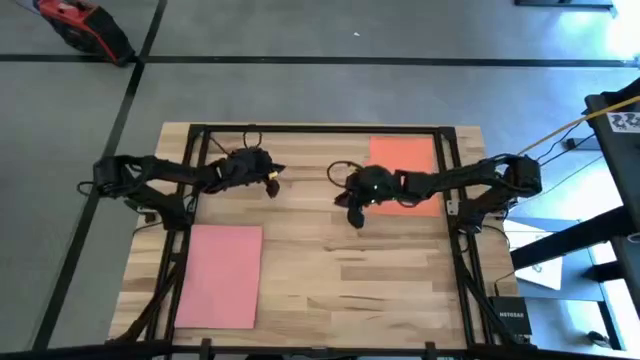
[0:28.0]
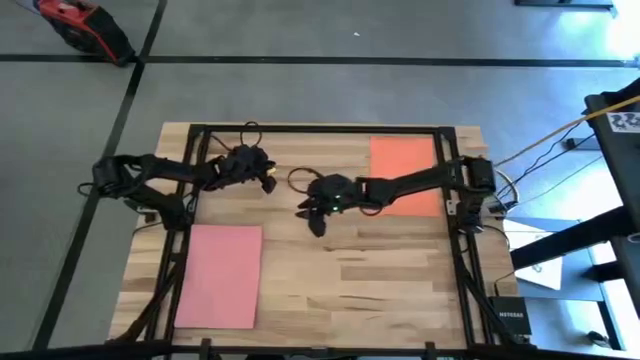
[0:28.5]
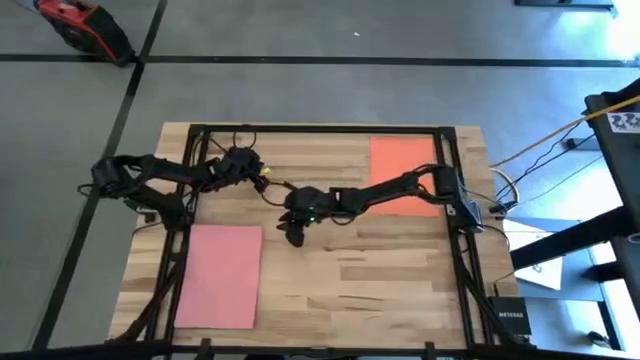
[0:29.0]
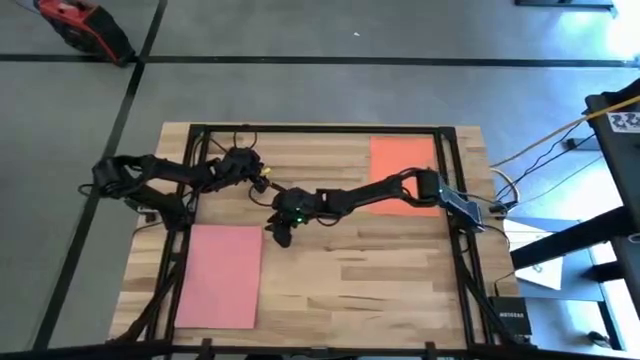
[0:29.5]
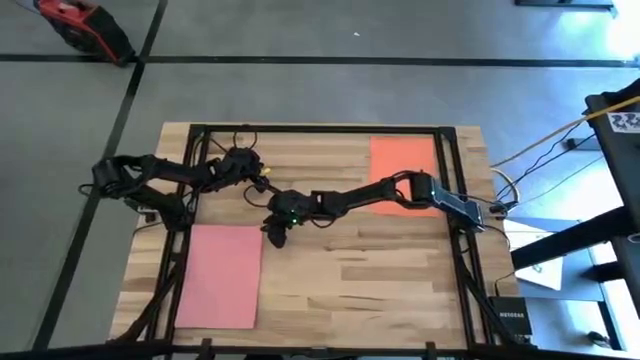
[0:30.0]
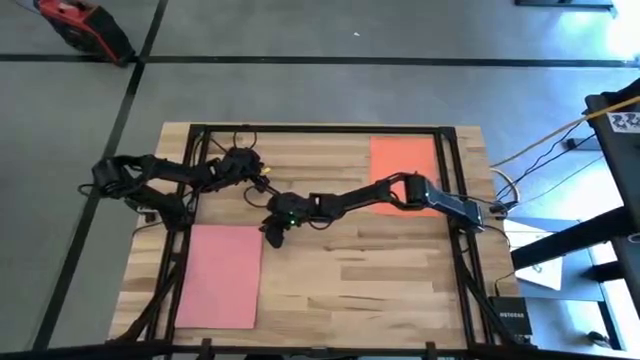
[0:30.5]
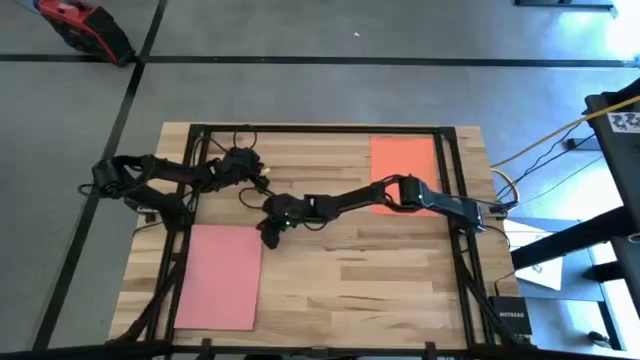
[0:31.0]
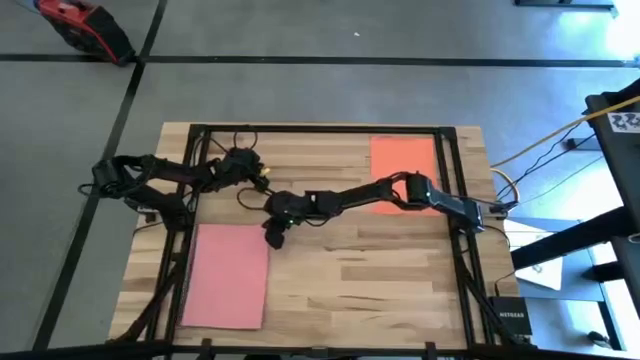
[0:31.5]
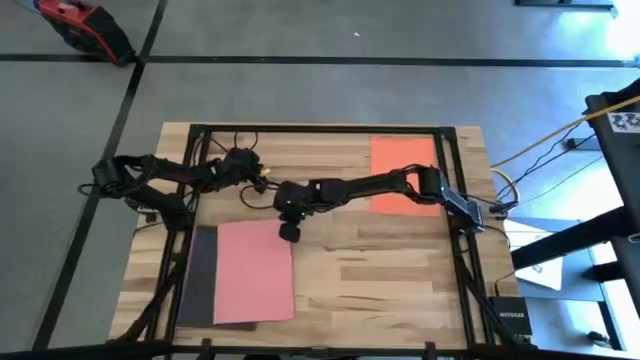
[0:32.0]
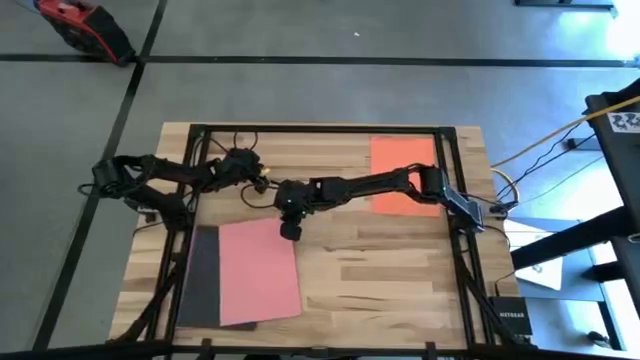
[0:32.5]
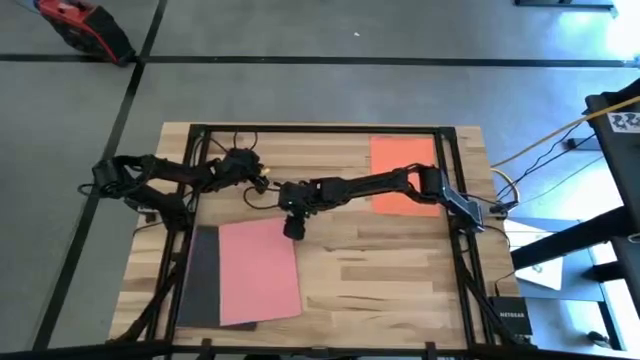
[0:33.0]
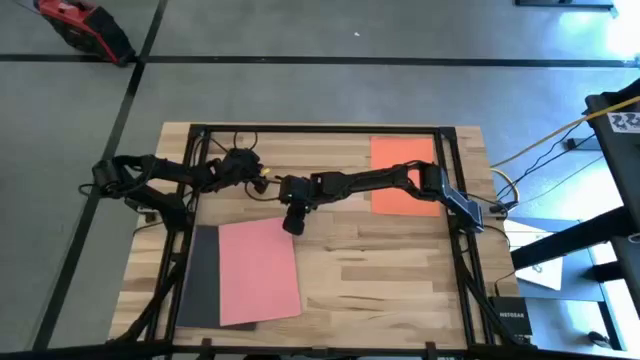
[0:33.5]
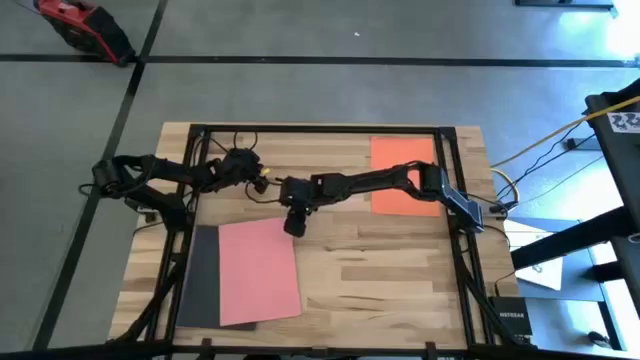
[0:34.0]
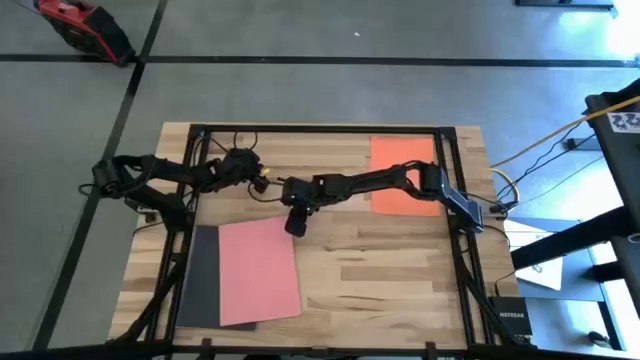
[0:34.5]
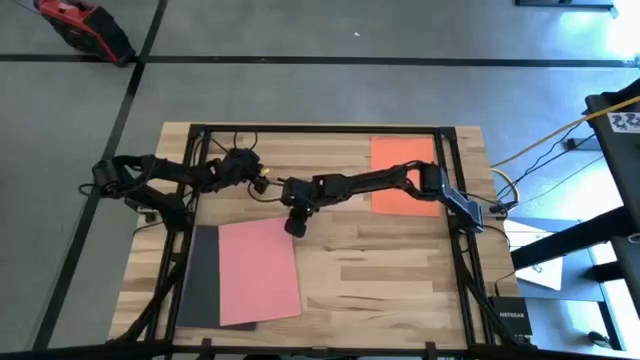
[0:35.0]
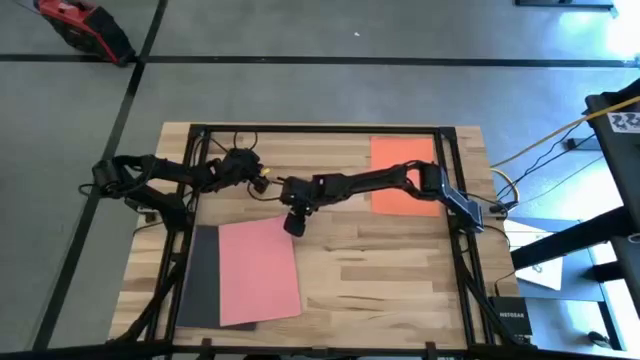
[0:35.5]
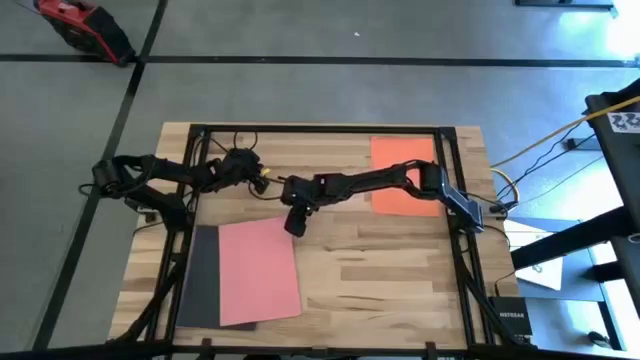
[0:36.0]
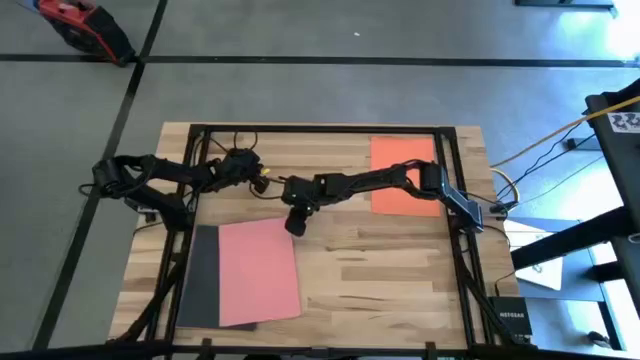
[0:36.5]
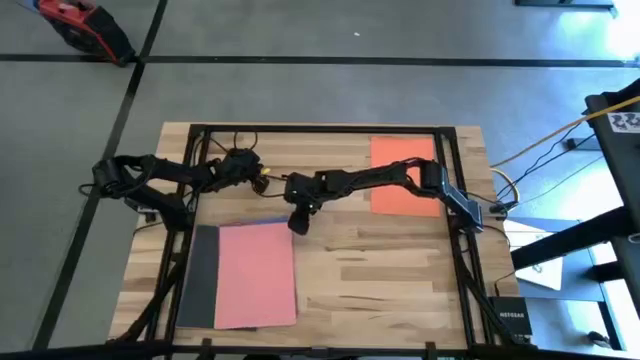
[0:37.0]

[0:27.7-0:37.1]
Task: Organize paper
Move the pink paper from bottom left to the top middle table

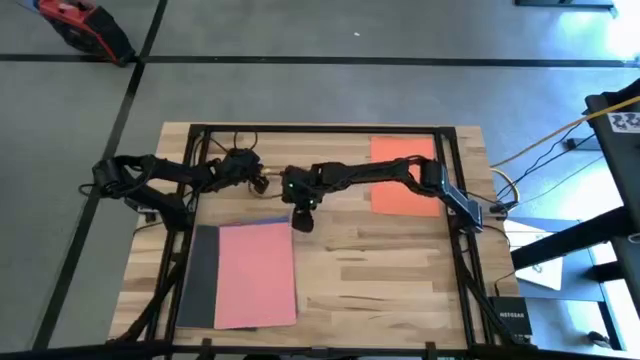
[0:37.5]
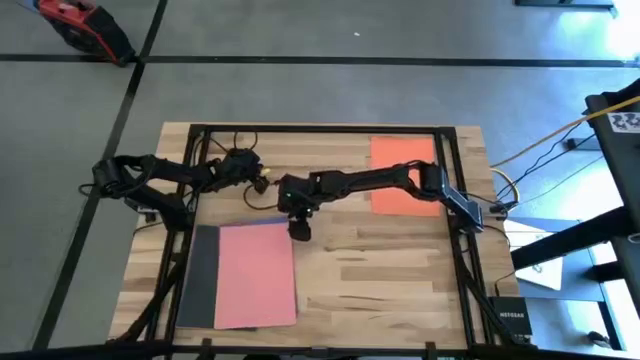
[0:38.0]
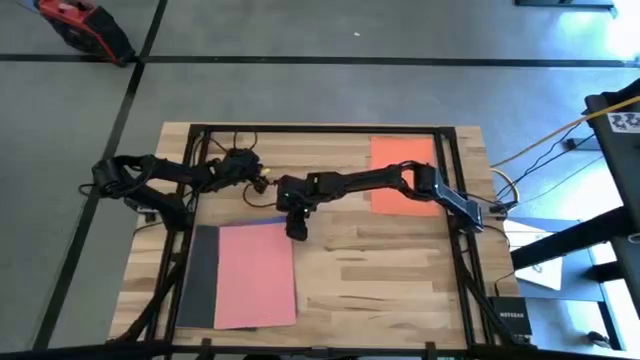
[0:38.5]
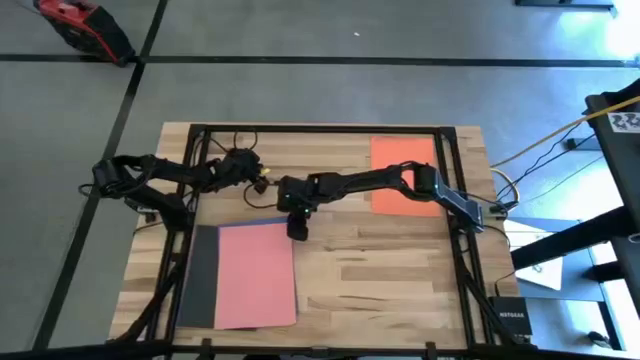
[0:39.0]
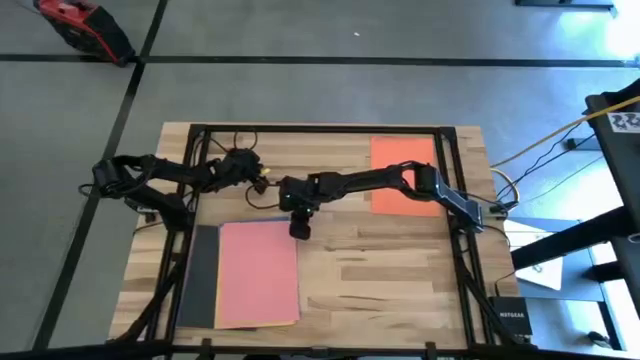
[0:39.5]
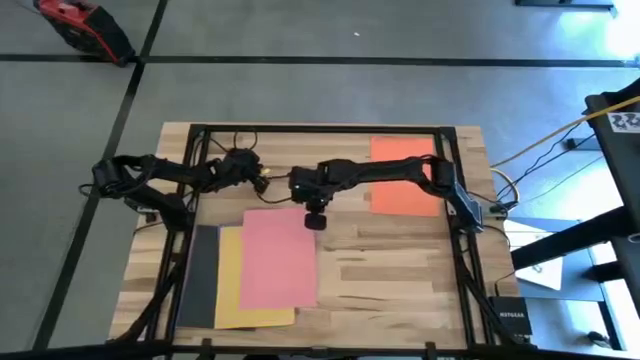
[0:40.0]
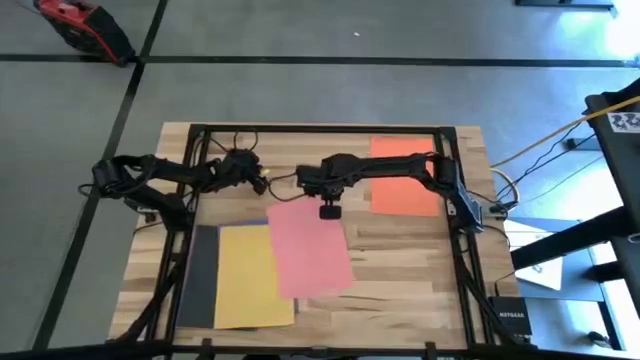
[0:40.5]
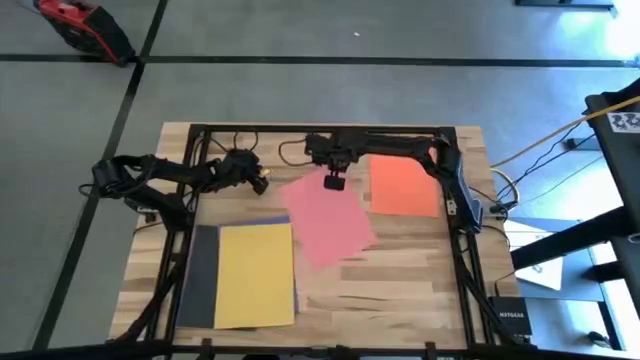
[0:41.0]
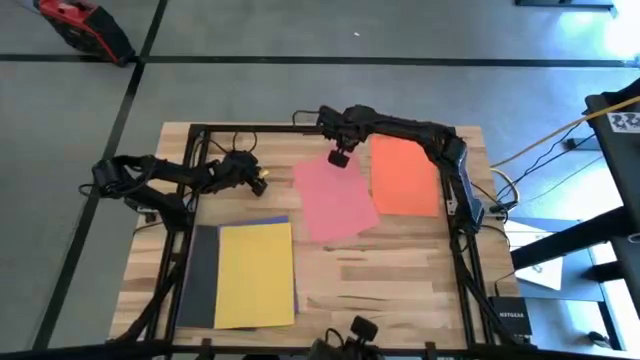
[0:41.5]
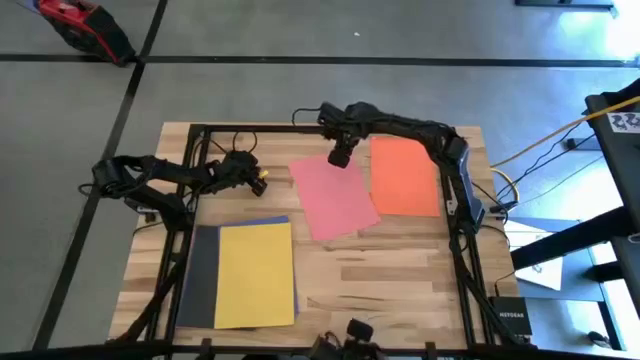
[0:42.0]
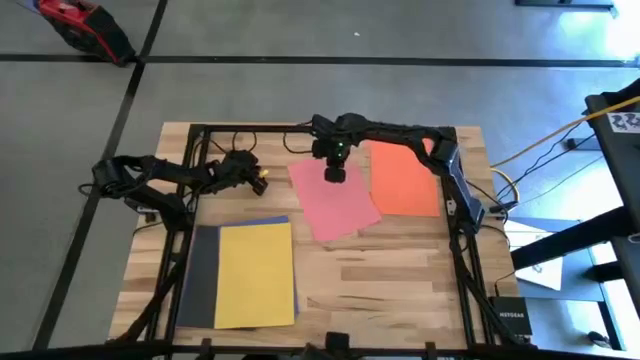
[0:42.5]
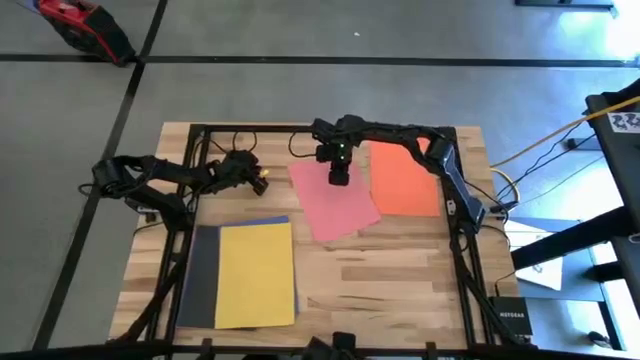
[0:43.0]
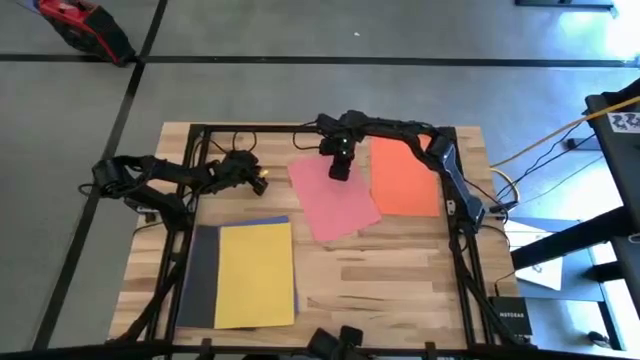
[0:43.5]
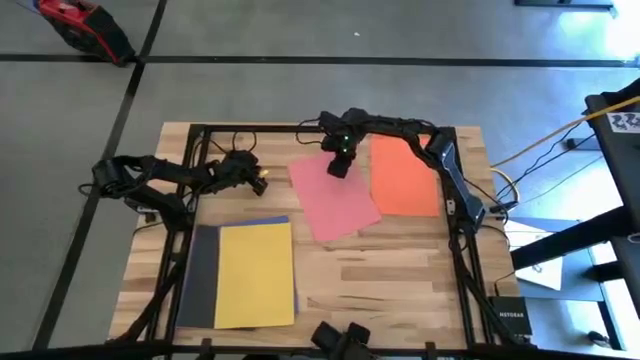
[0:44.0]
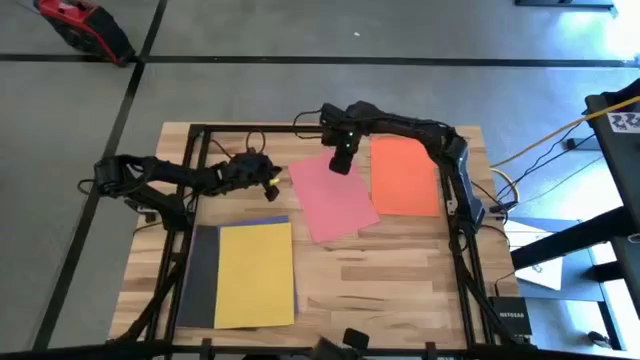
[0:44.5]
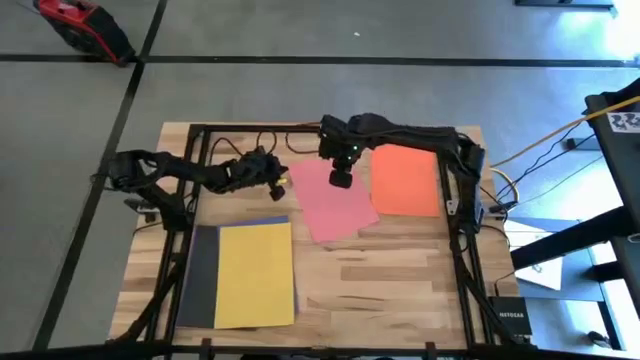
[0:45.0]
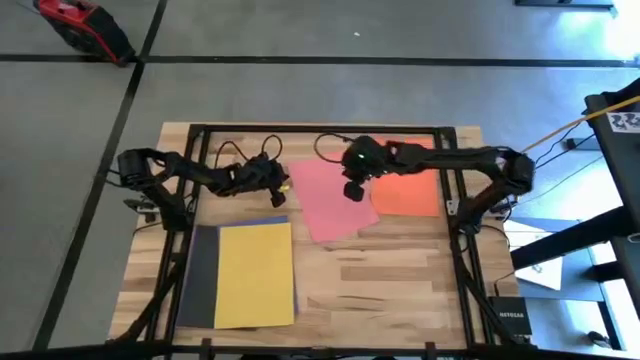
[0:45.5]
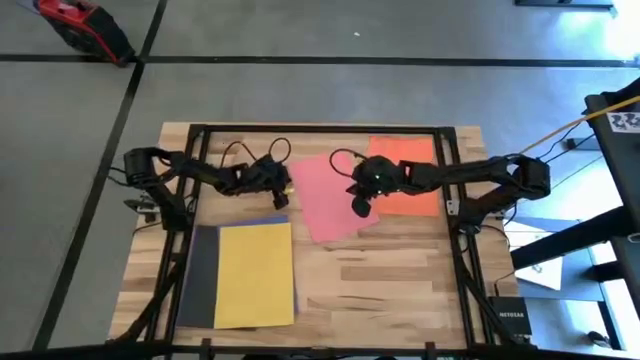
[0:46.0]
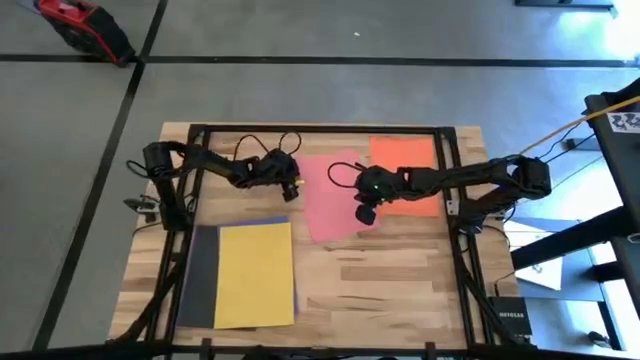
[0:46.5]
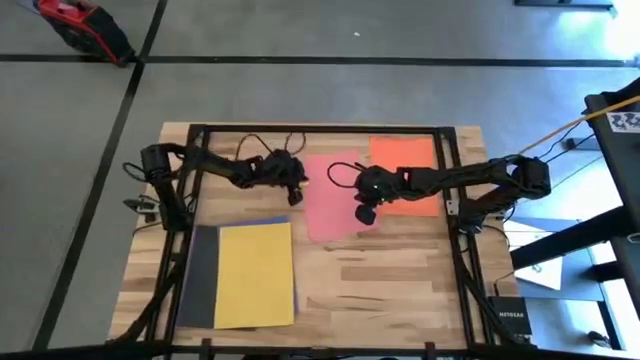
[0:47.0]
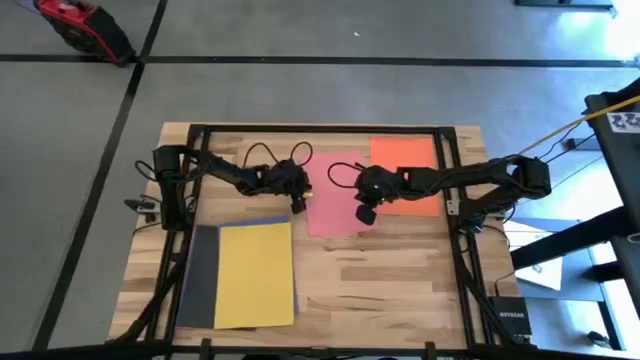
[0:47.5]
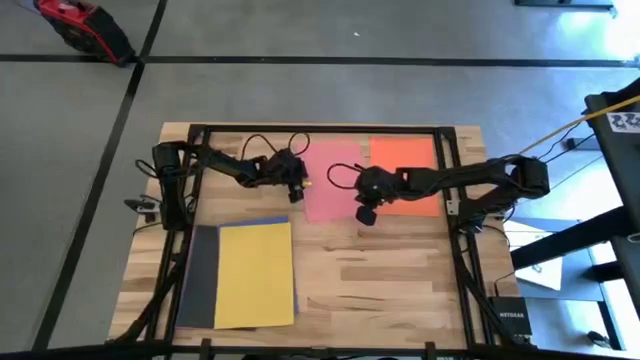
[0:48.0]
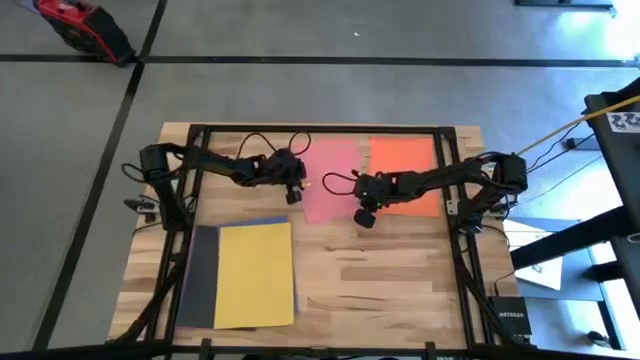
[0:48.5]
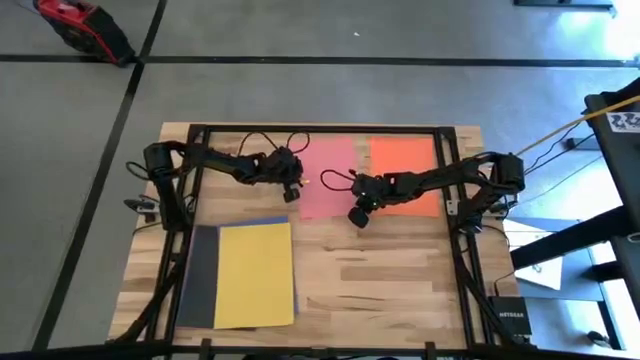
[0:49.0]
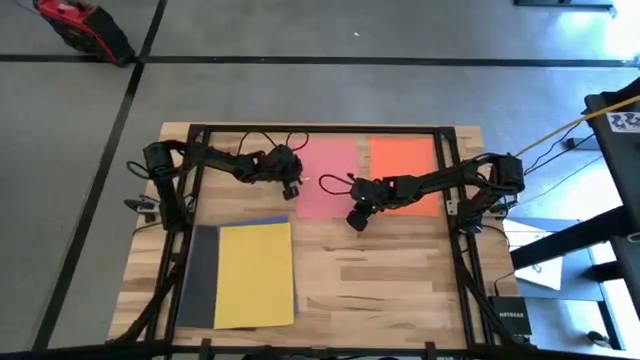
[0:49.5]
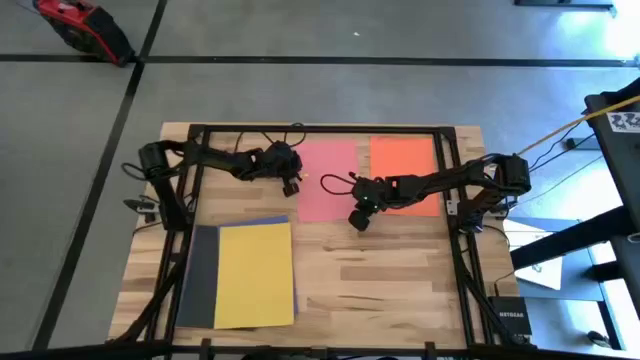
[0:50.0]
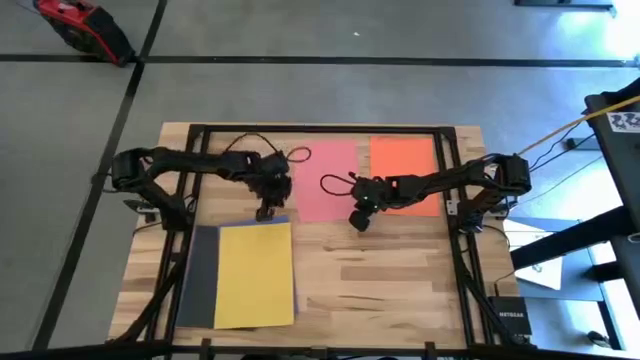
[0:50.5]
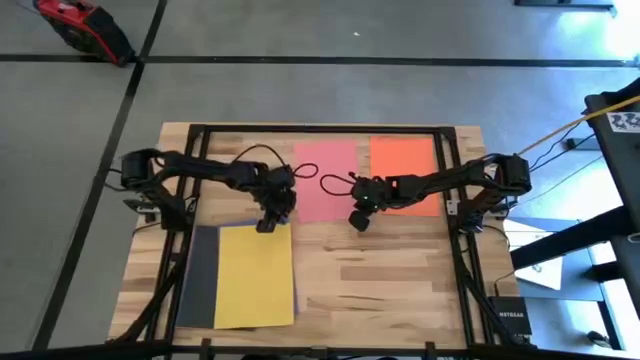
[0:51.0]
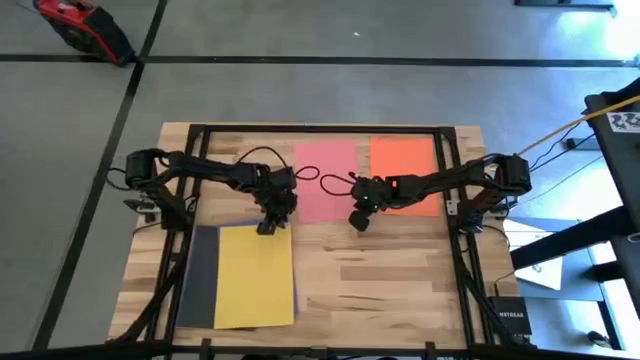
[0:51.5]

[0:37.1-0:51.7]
Move the pink paper from bottom left to the top middle table
